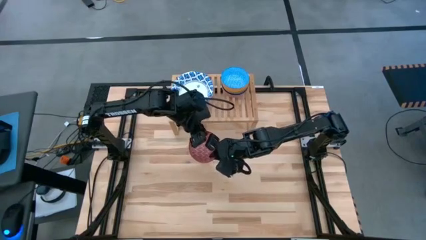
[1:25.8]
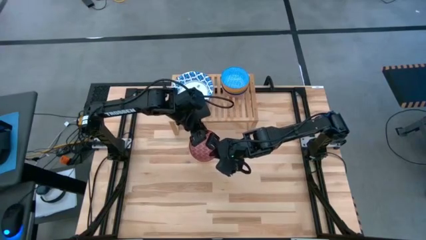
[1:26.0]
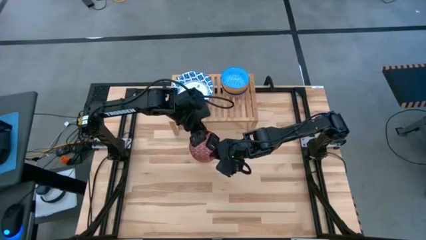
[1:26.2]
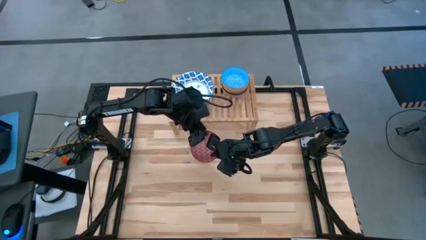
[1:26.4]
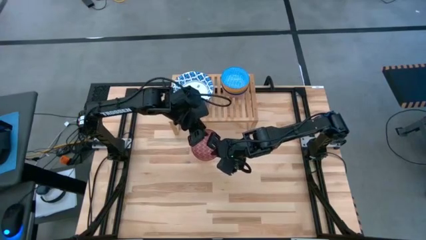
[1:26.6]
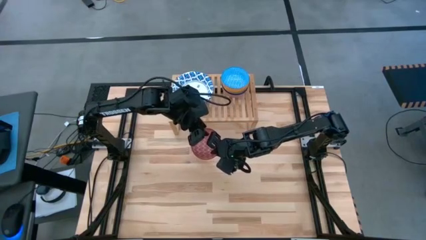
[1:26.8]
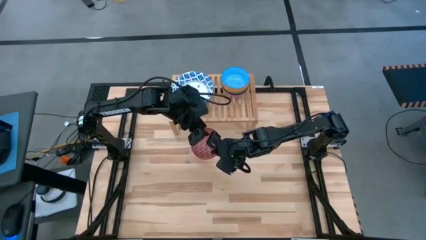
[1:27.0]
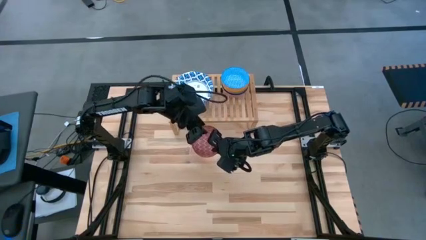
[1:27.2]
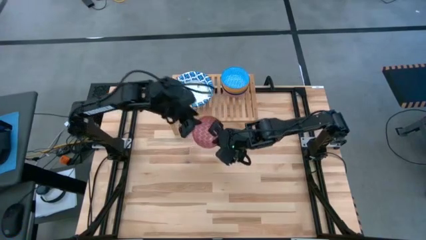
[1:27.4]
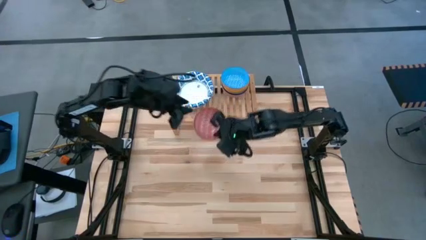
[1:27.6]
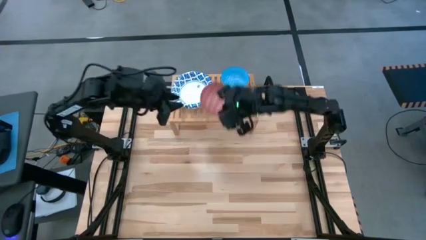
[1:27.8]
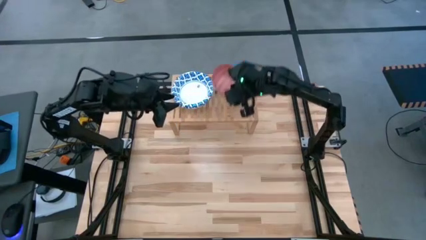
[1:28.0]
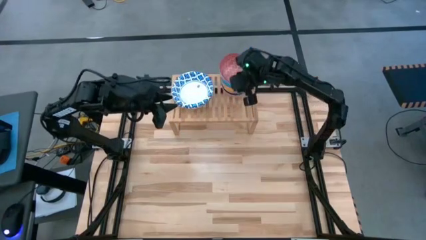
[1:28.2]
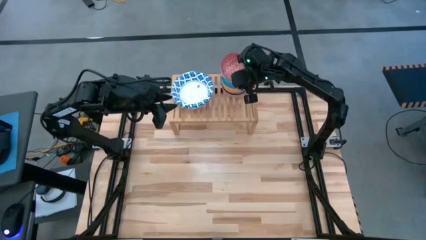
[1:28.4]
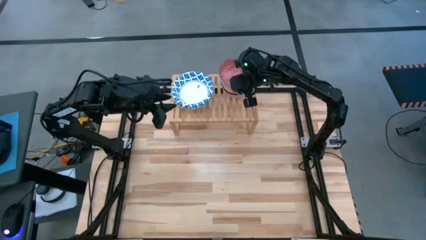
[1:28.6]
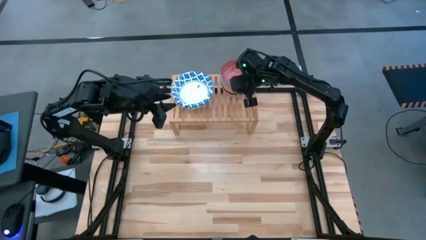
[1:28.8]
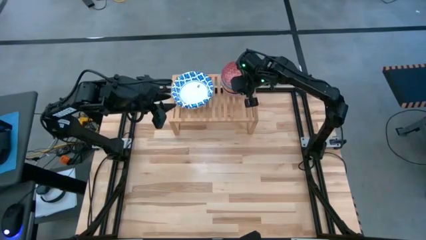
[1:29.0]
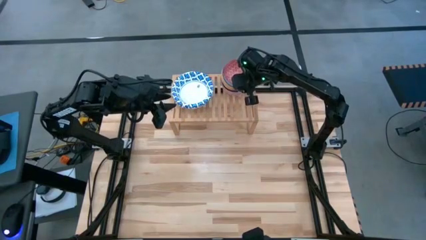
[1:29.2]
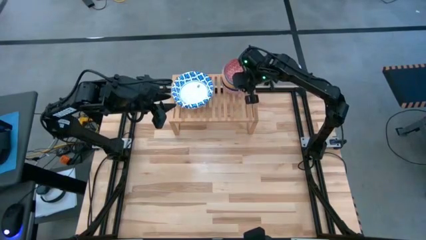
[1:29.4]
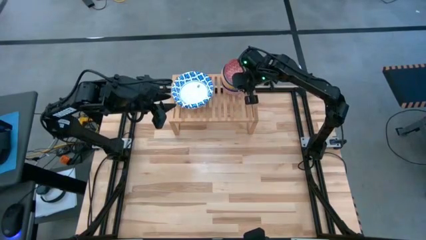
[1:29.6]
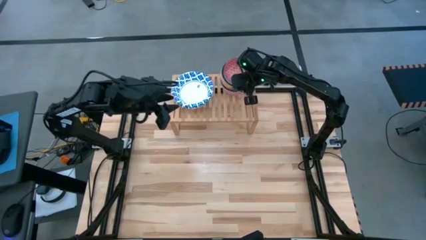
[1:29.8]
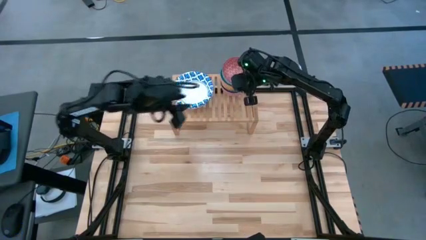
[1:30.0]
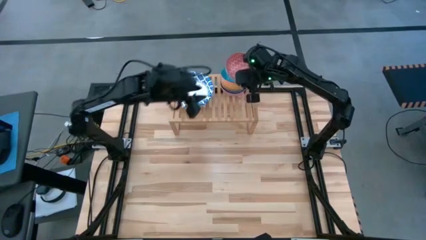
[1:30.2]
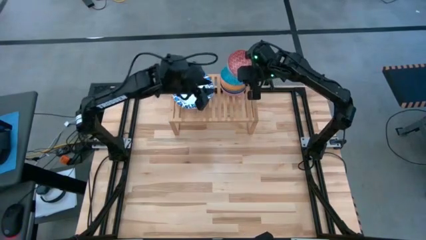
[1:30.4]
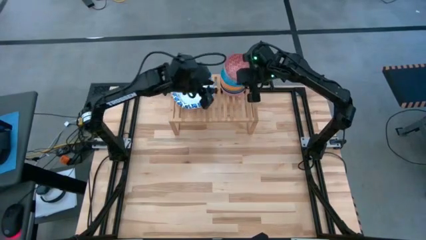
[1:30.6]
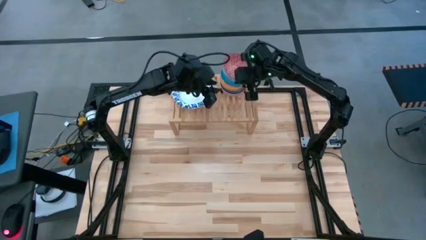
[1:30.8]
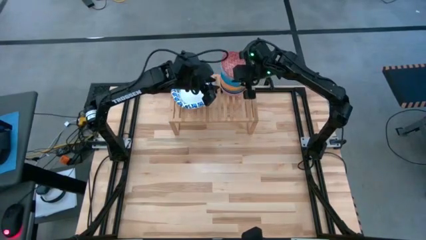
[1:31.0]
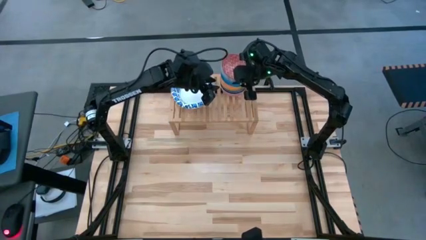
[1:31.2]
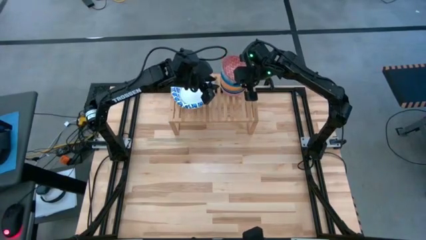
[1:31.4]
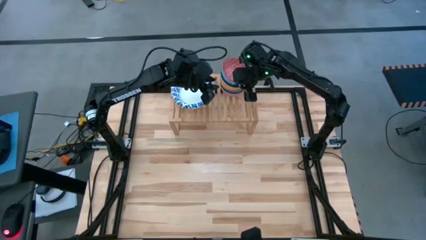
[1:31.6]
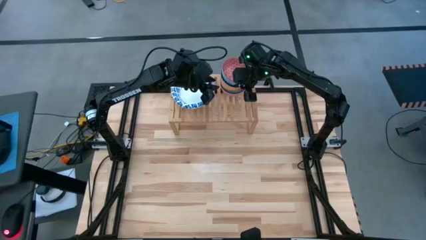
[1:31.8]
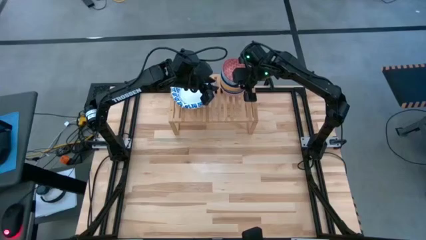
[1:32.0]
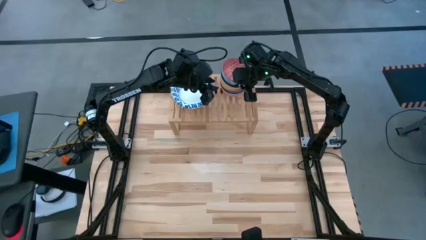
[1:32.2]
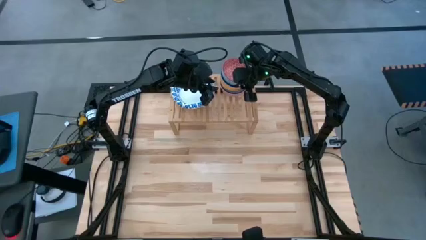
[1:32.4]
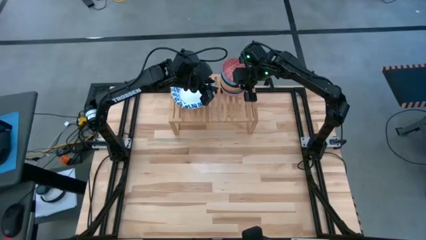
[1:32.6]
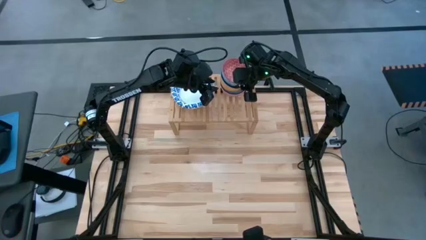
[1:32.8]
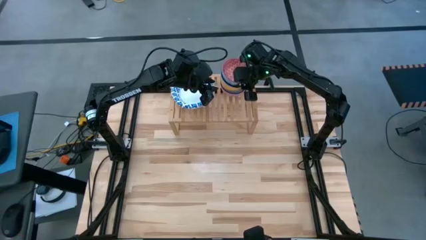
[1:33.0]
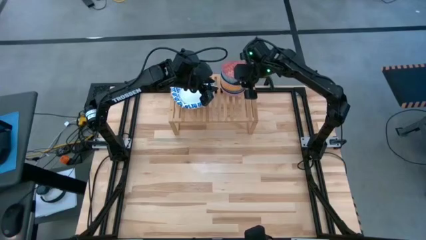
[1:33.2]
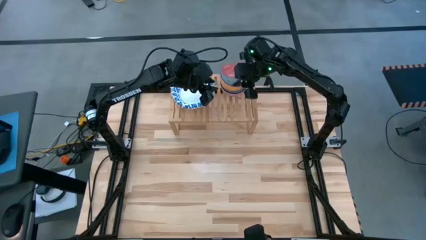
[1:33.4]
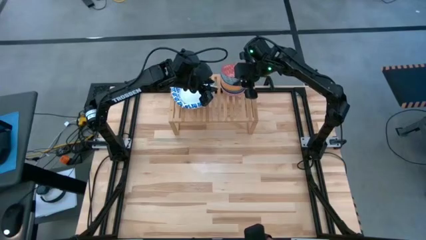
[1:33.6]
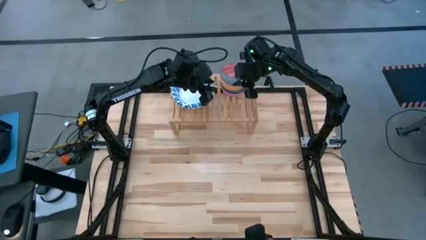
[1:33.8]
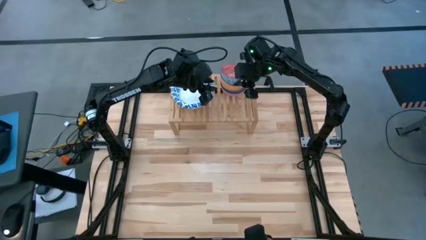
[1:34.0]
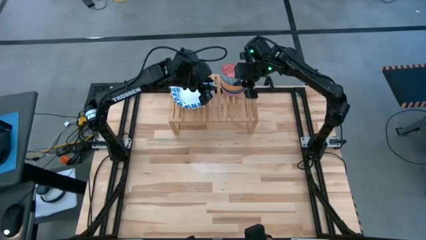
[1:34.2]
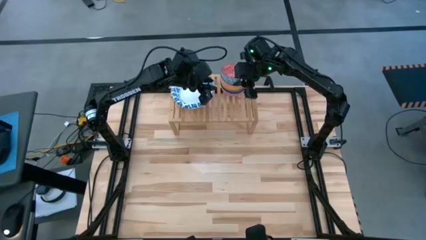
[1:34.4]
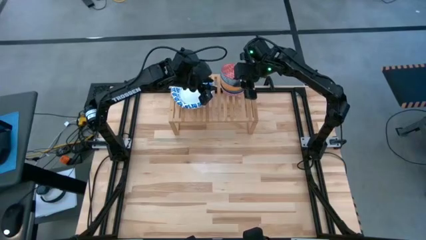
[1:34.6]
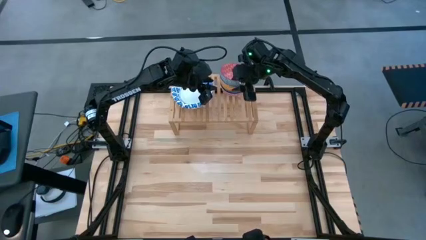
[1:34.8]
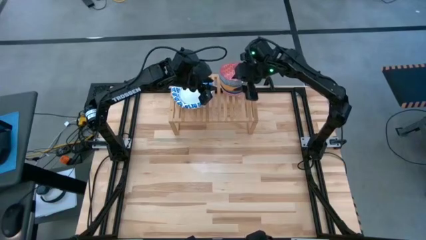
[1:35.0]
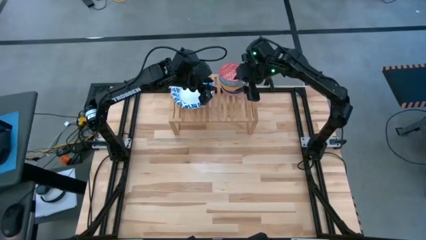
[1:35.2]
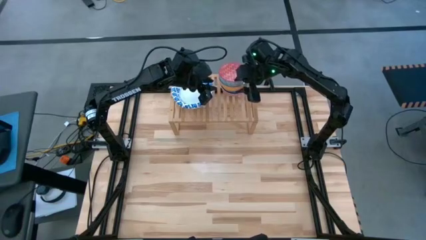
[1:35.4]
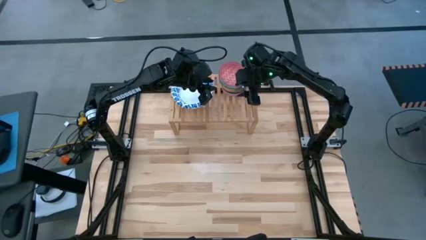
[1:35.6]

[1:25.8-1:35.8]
Task: Place and stack bowls onto a shelf
Stack the gray red patterned bowl on top of the orange blue patterned bowl on the shelf

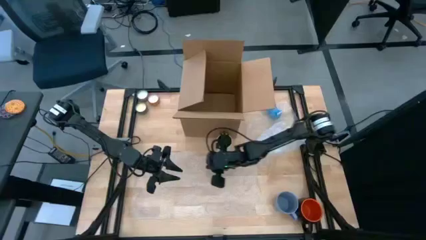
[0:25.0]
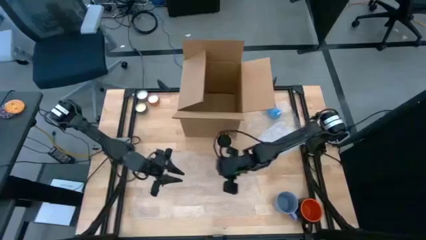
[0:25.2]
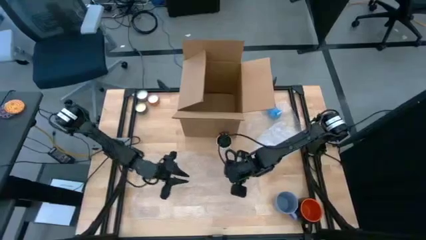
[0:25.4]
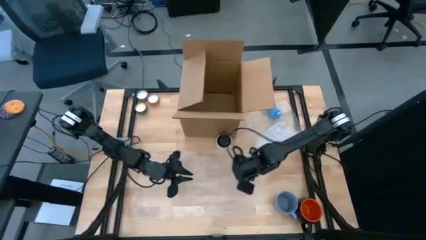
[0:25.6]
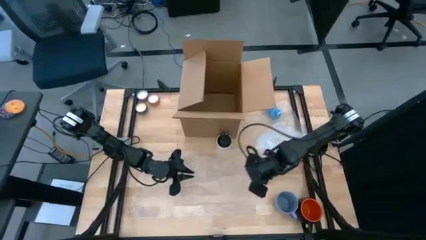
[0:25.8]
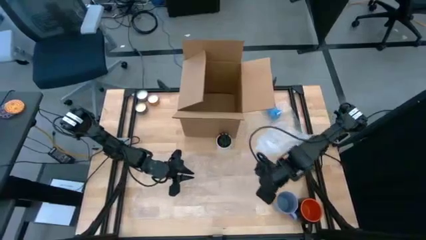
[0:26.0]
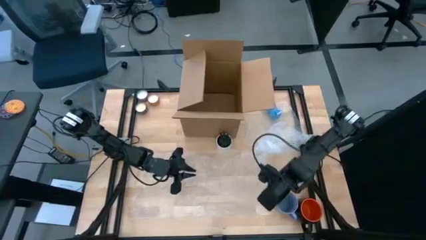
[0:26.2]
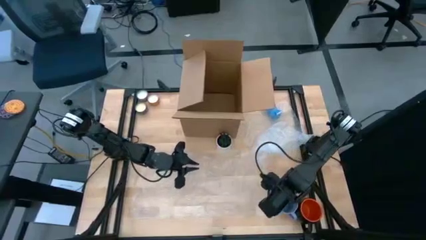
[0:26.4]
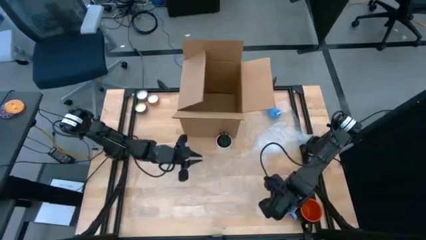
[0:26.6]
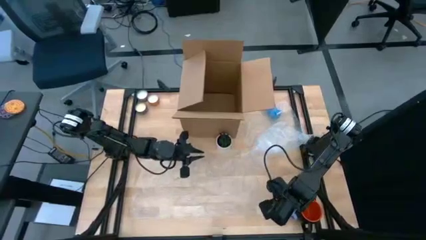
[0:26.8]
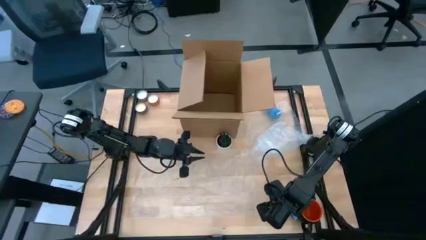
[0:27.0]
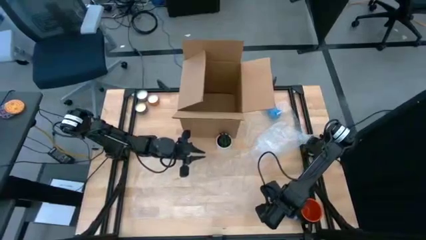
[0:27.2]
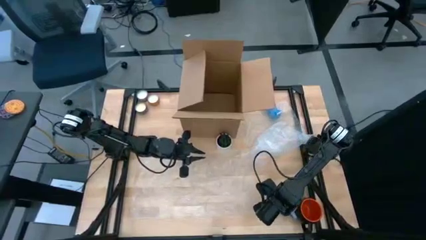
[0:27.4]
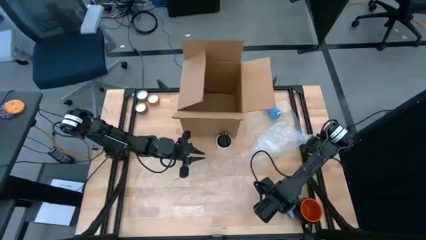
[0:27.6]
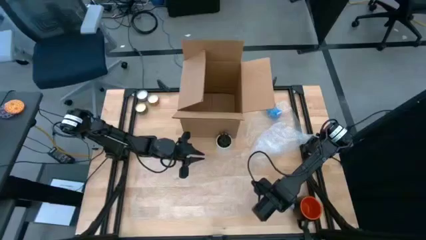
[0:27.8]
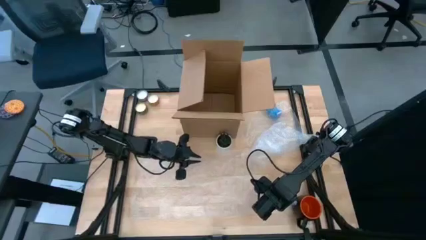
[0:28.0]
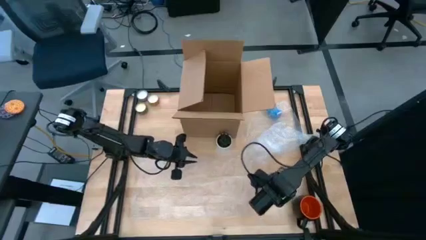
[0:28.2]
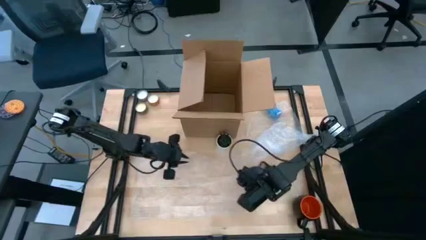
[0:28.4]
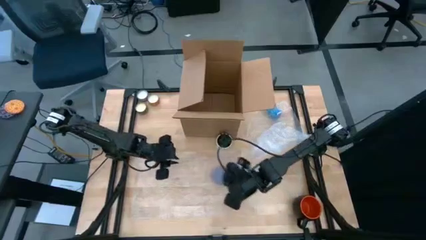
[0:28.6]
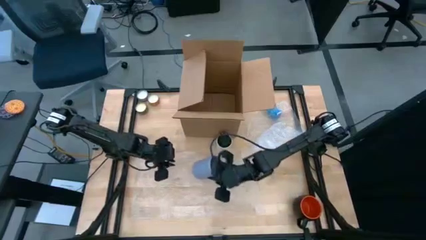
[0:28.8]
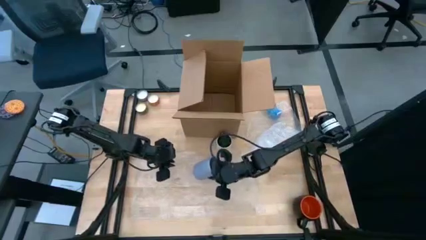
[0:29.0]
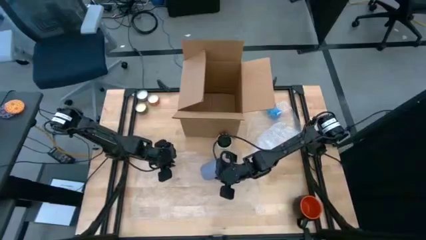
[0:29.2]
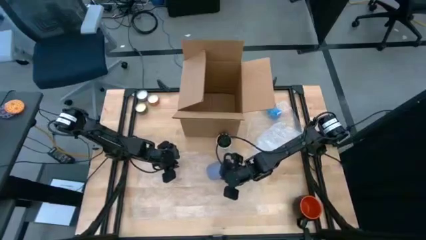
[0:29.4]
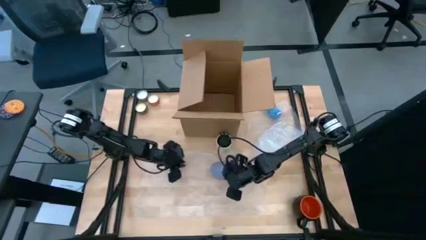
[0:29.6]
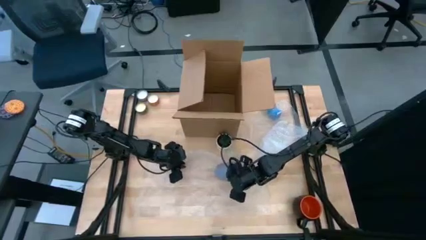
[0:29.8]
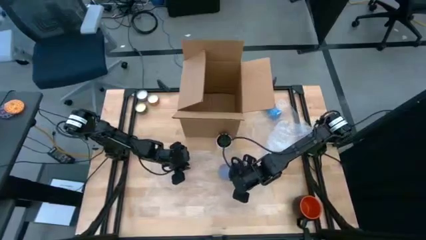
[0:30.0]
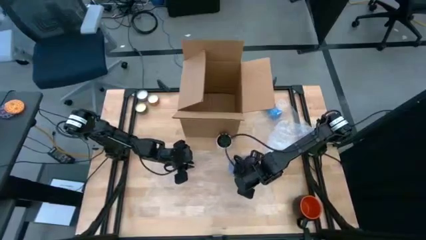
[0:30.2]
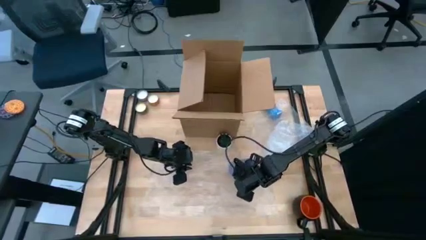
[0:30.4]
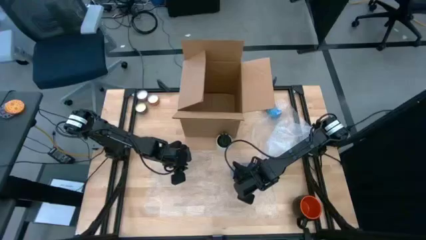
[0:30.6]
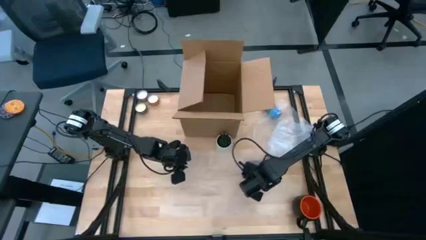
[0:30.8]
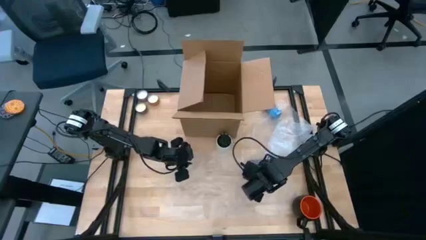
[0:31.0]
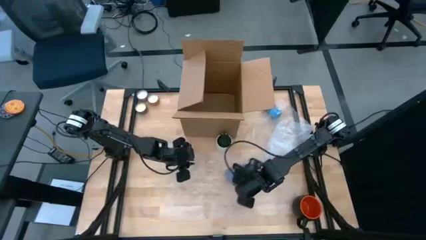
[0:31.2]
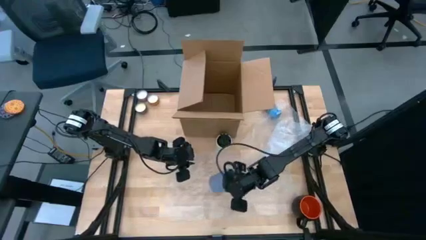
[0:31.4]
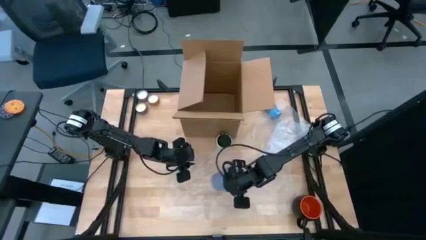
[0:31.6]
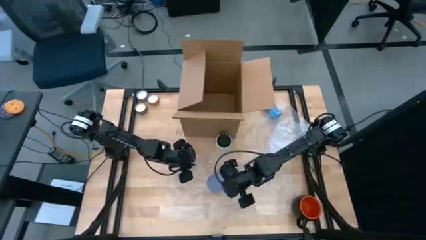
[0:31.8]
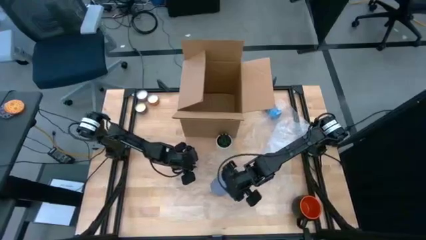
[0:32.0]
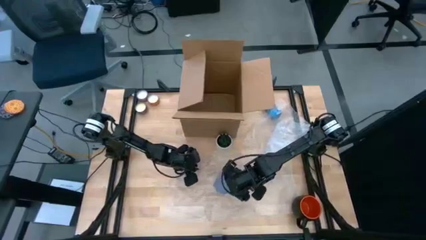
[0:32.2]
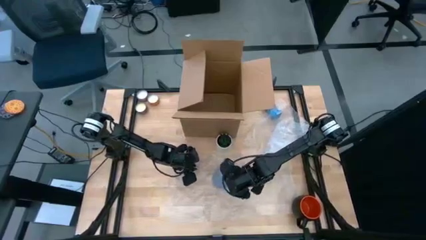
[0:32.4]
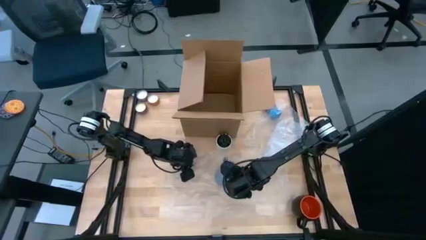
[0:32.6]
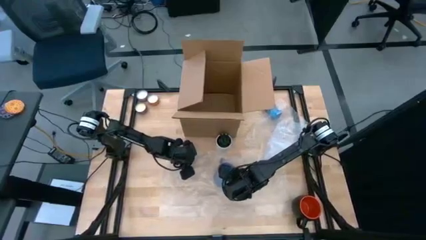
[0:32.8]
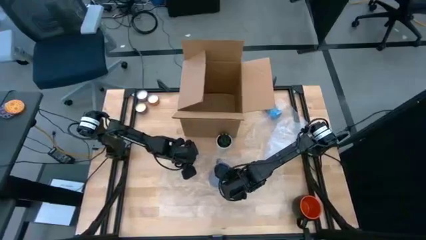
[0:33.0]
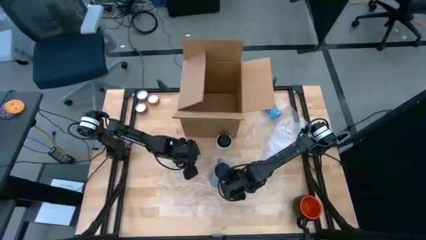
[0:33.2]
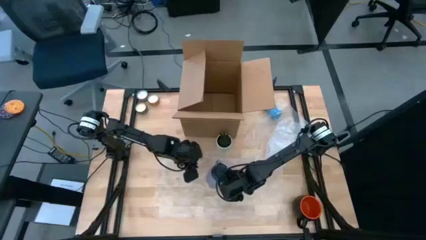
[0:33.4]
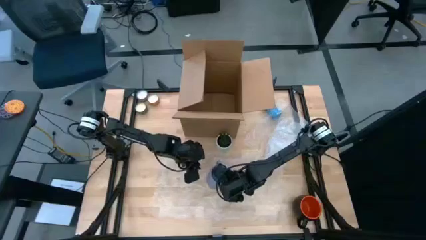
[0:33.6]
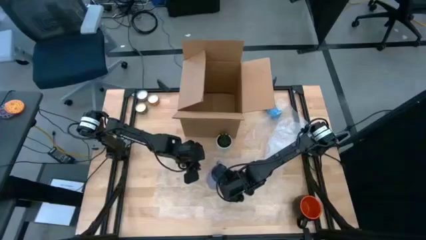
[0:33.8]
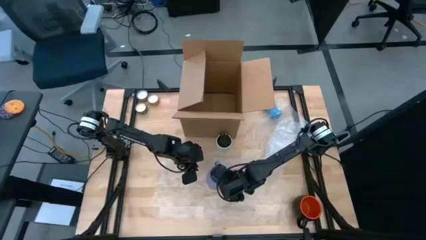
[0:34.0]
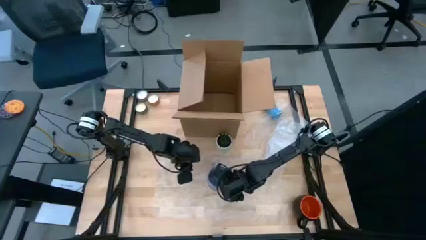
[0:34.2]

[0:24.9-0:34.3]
Task: wrap mug
Put the blue cup on the transparent bubble wrap
